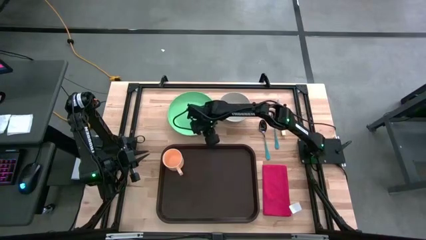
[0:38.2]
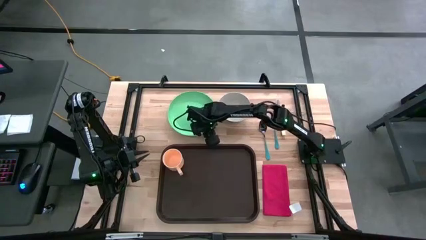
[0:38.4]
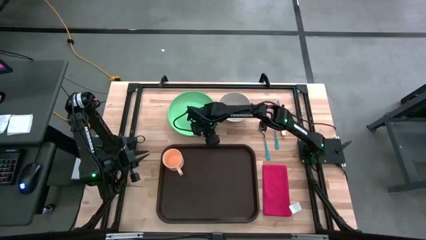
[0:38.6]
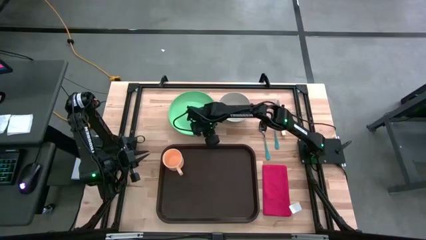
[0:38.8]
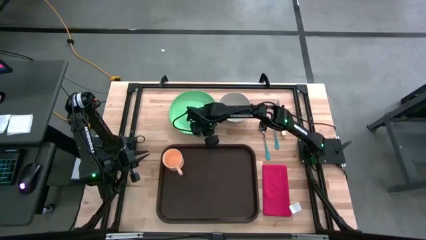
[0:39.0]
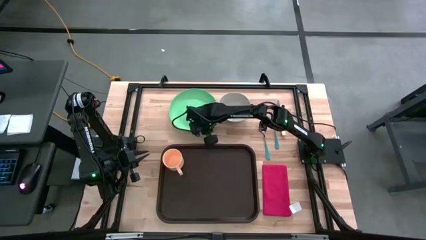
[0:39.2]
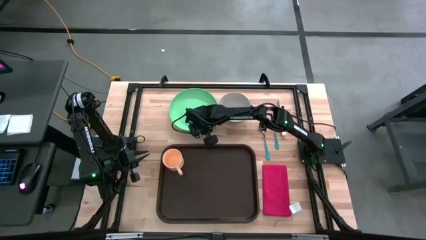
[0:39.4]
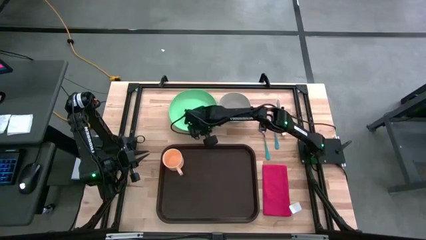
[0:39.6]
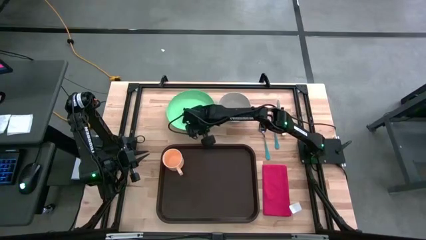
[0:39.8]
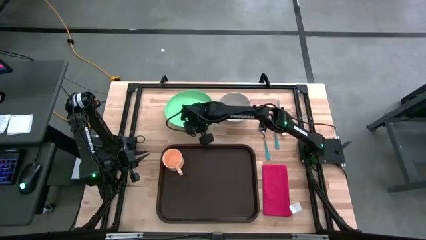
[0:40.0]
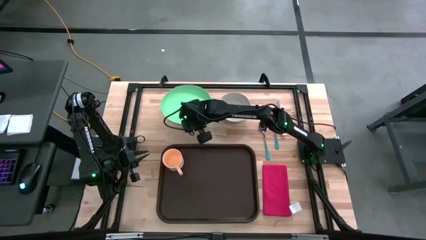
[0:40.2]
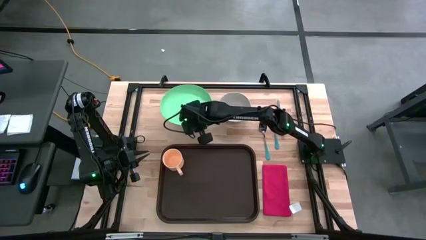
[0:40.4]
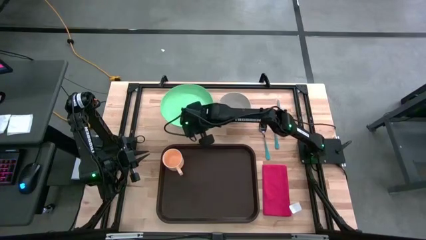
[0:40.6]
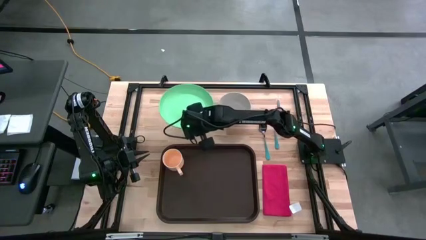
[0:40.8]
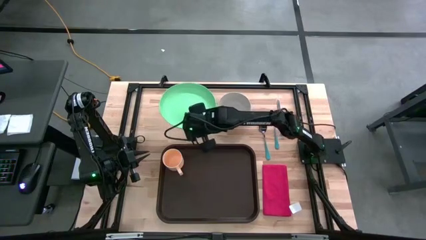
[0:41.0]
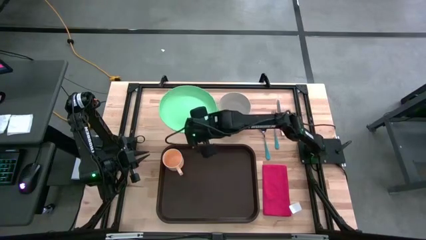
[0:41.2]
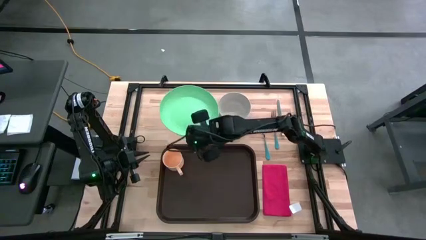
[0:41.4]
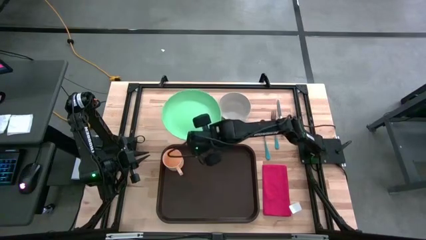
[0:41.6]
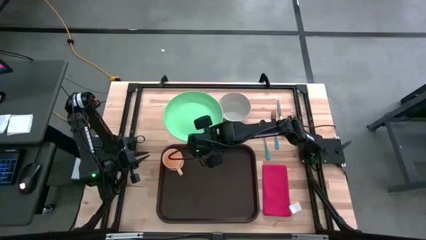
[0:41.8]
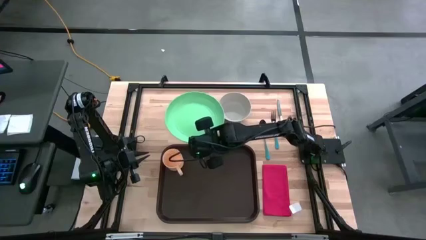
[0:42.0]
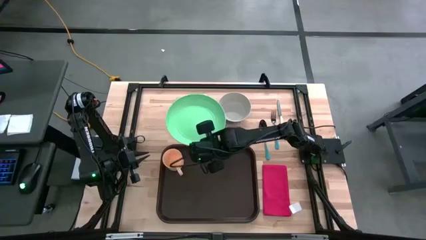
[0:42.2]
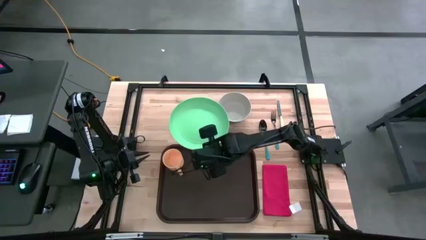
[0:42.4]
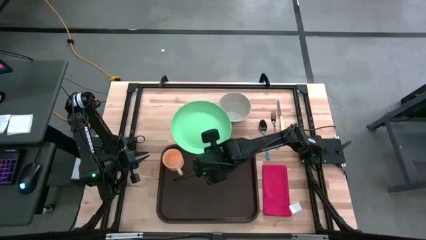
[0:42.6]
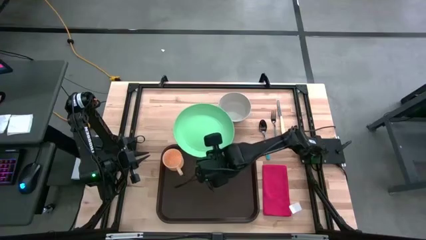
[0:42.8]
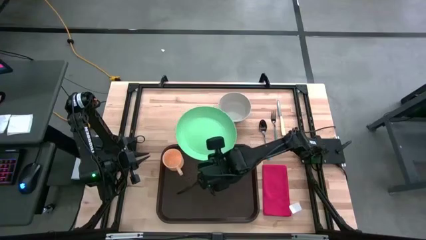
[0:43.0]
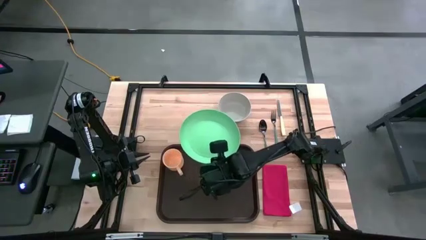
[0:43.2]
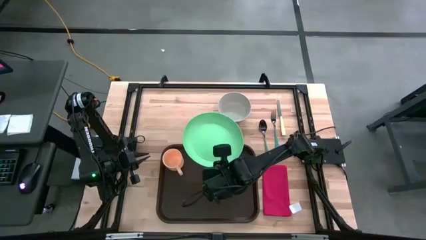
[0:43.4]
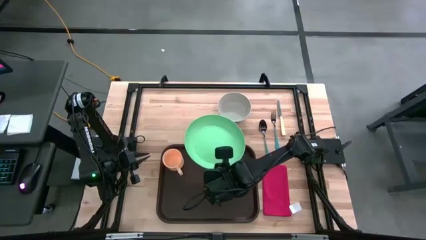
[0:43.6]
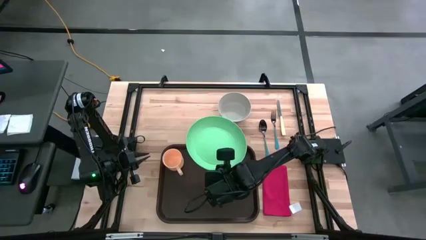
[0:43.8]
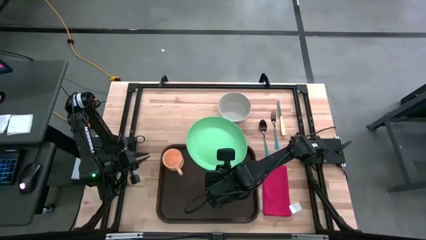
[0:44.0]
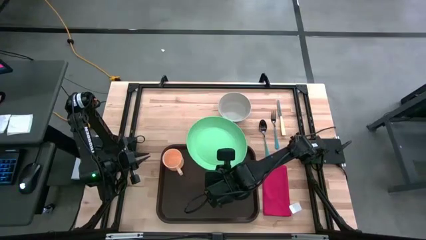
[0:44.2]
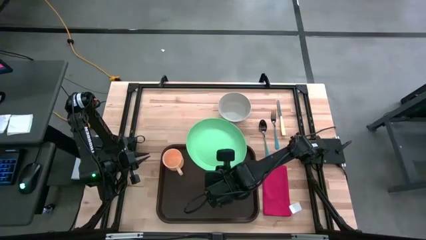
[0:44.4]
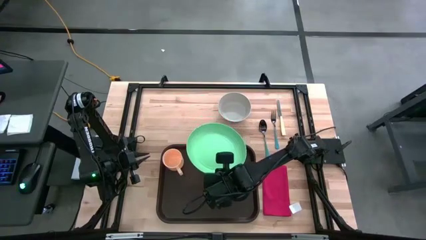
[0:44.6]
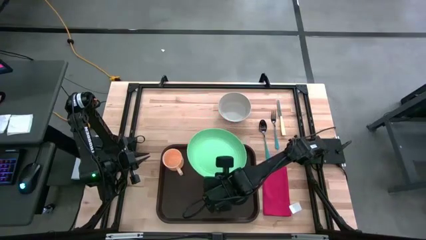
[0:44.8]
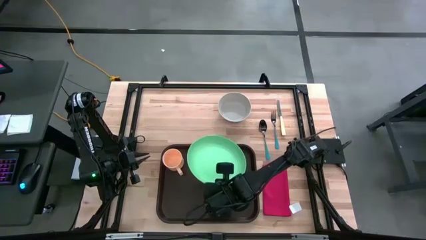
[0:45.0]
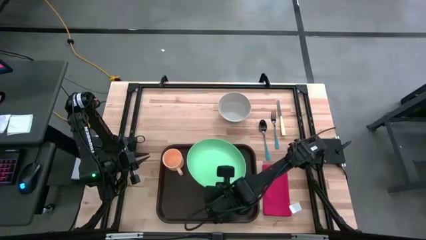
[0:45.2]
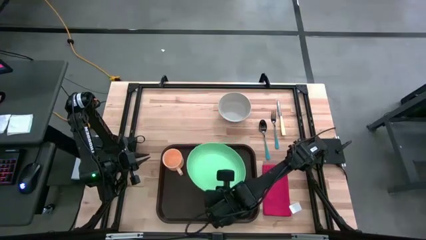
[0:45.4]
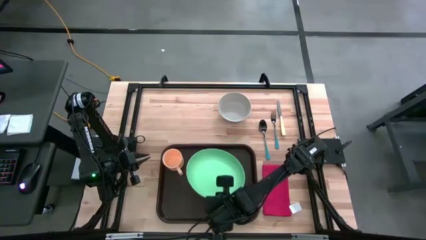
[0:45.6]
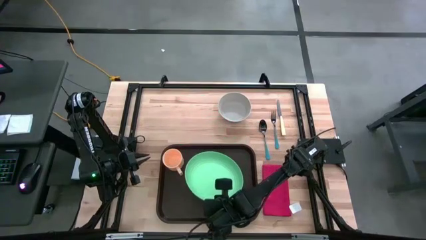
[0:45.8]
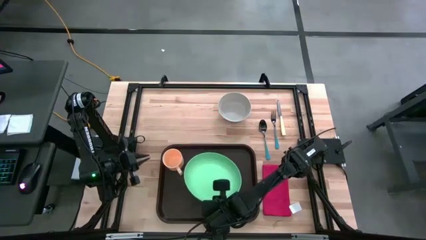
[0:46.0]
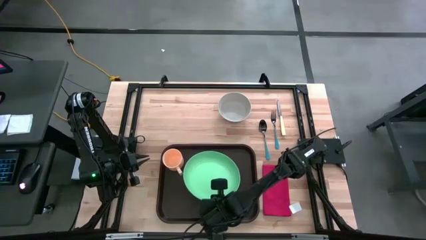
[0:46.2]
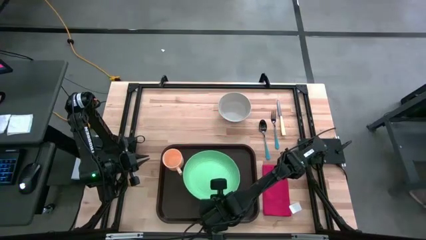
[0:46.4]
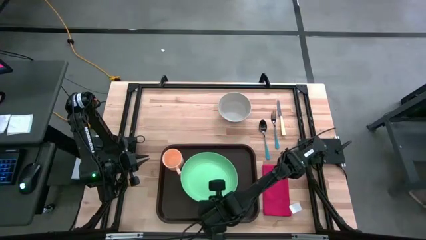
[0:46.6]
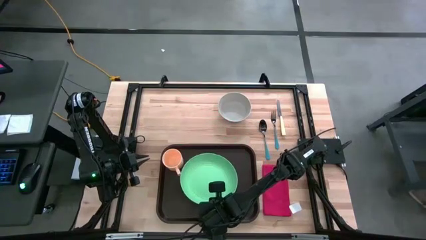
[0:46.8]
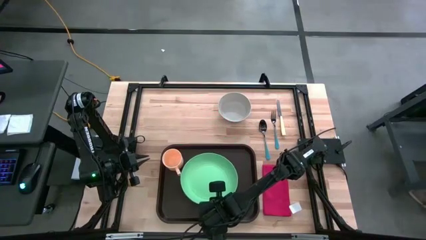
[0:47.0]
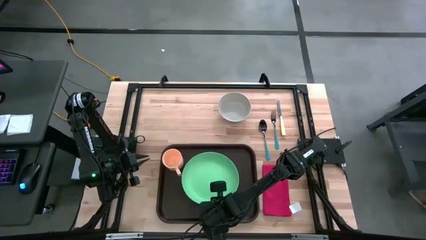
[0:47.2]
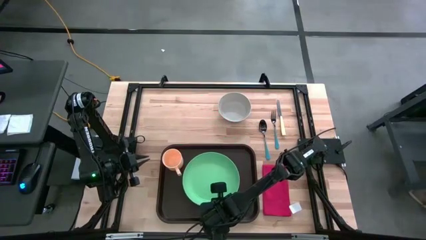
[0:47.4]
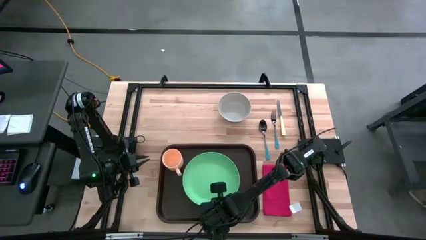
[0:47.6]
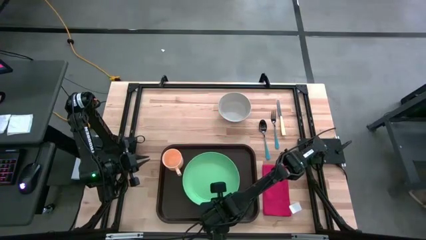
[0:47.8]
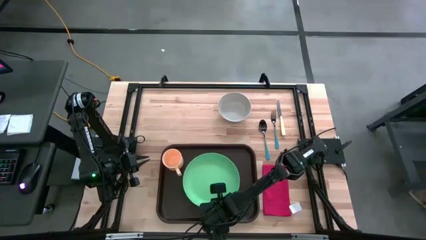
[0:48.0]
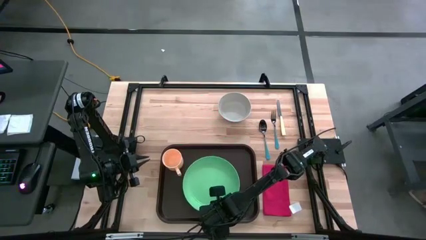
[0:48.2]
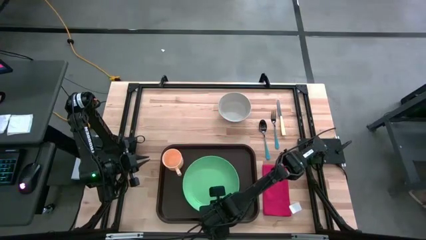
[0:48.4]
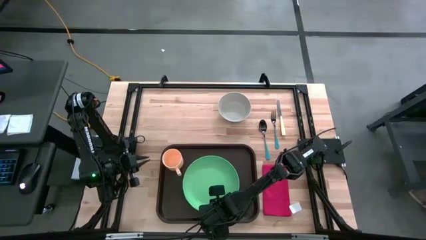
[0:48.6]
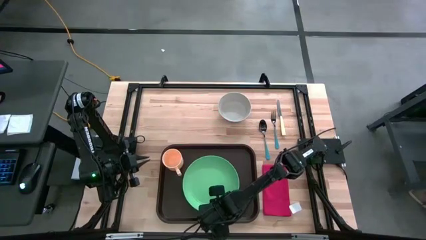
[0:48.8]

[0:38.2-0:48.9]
Task: Set up tray
Put the green plate on the black serving tray to the bottom right of the orange mug

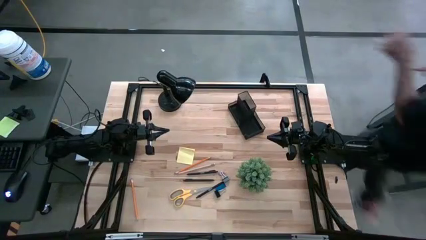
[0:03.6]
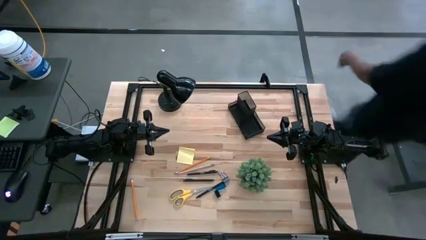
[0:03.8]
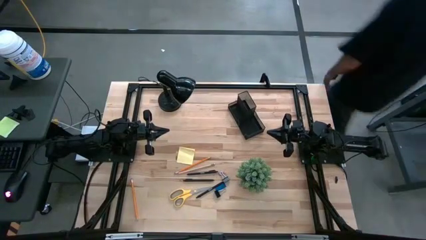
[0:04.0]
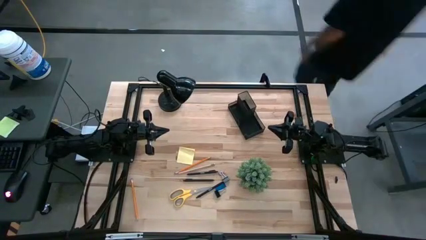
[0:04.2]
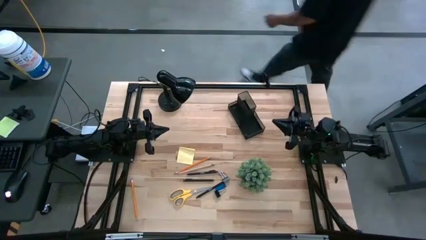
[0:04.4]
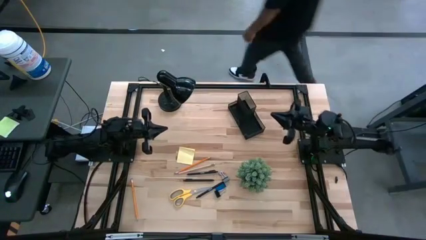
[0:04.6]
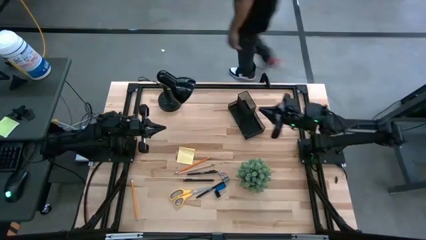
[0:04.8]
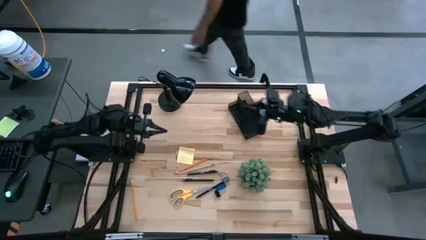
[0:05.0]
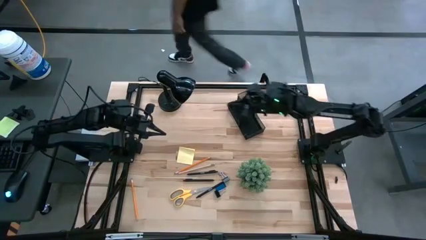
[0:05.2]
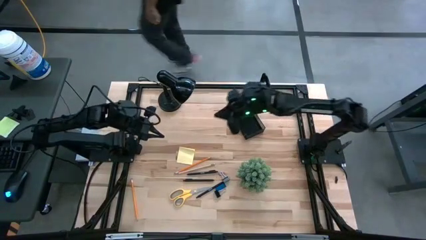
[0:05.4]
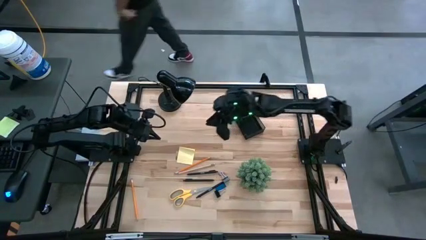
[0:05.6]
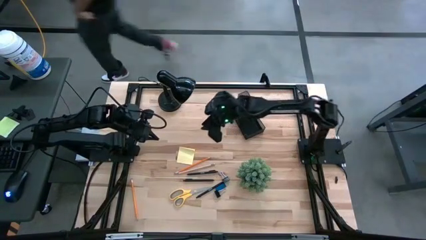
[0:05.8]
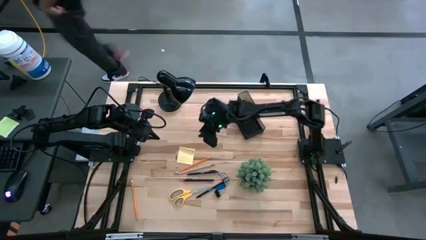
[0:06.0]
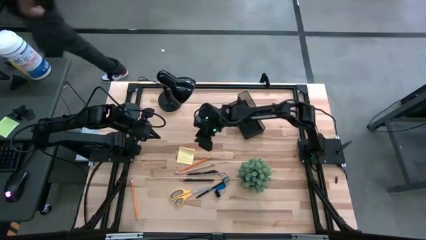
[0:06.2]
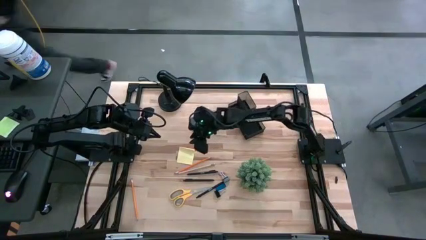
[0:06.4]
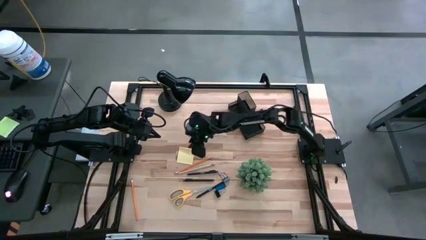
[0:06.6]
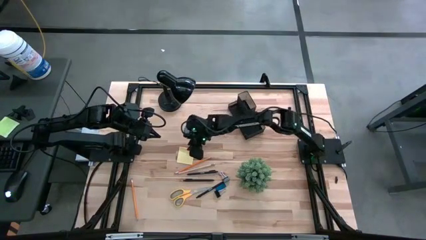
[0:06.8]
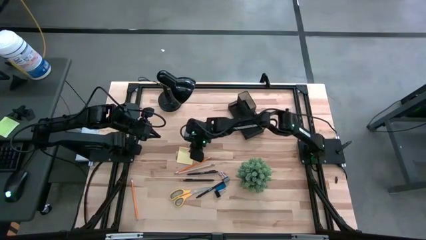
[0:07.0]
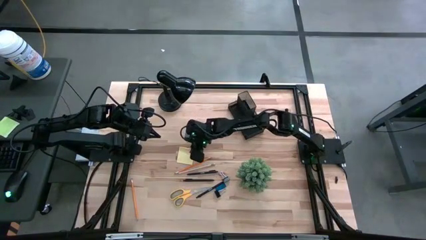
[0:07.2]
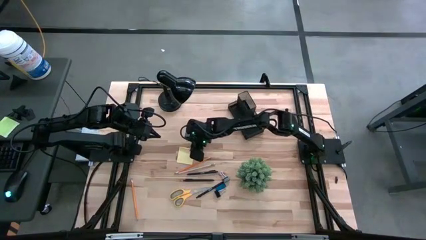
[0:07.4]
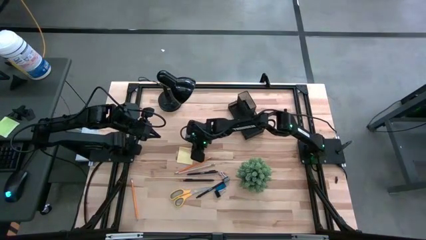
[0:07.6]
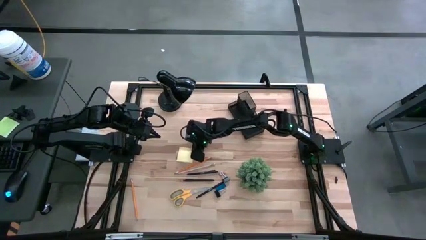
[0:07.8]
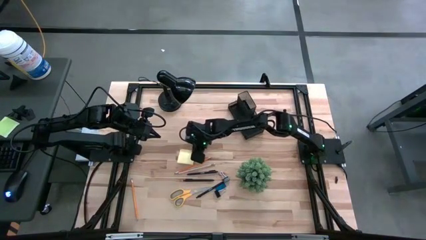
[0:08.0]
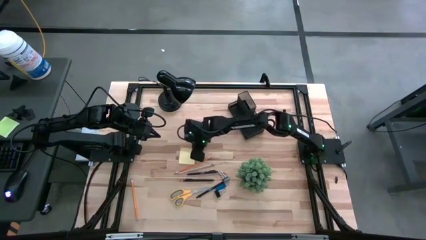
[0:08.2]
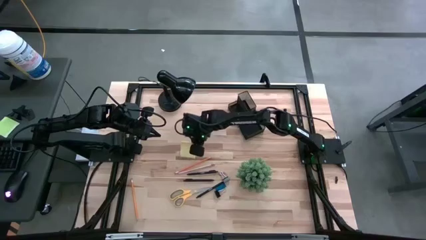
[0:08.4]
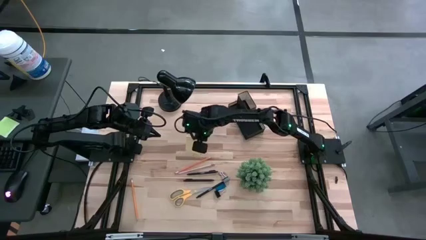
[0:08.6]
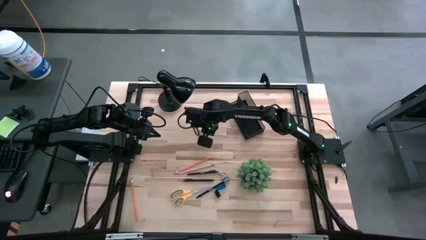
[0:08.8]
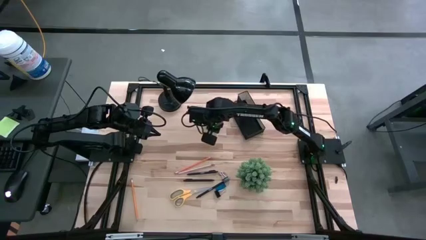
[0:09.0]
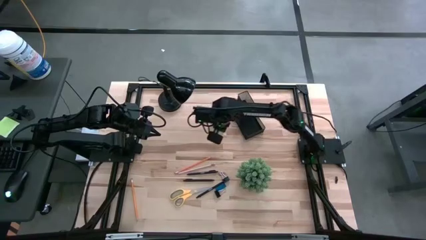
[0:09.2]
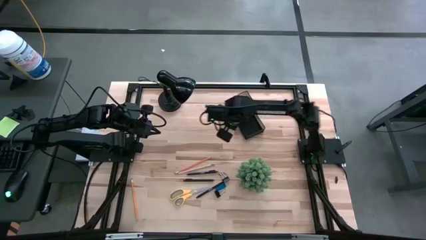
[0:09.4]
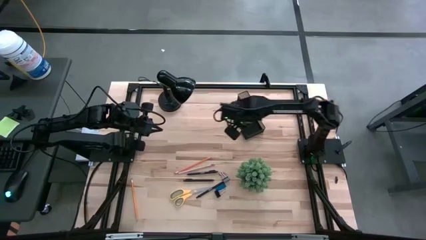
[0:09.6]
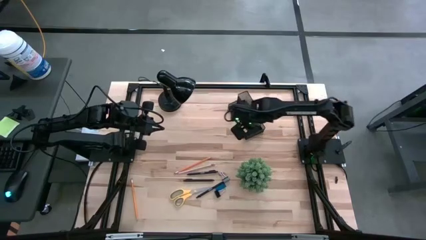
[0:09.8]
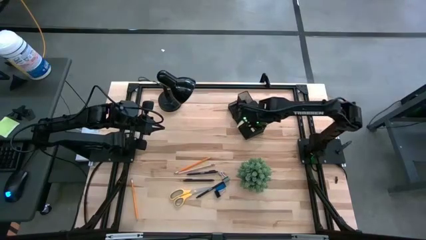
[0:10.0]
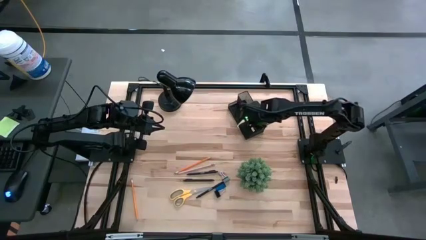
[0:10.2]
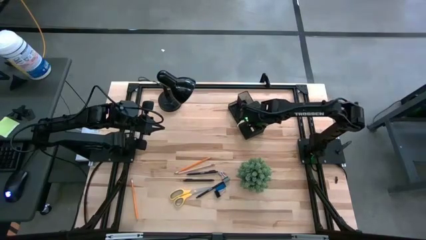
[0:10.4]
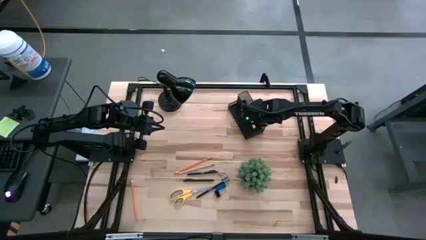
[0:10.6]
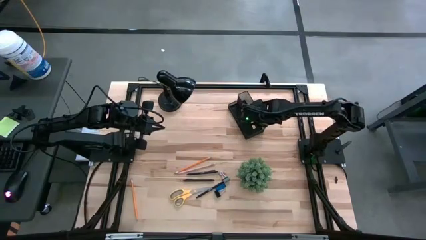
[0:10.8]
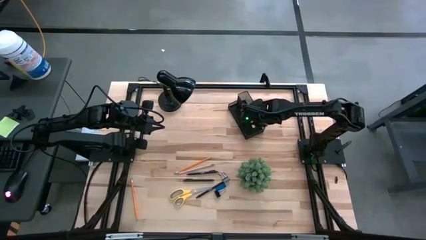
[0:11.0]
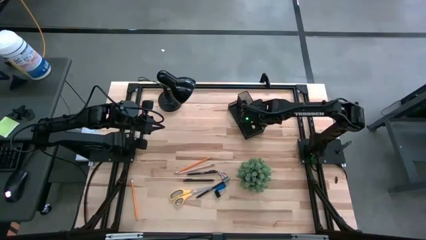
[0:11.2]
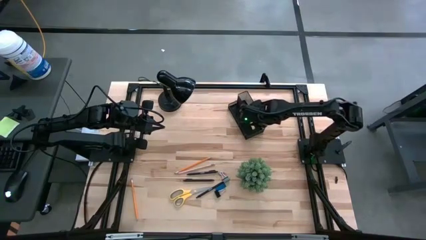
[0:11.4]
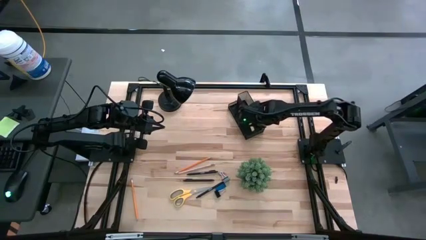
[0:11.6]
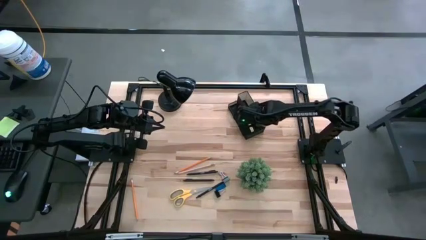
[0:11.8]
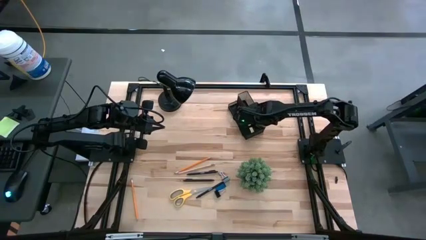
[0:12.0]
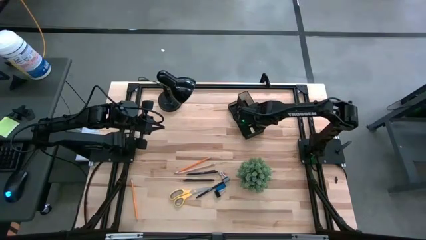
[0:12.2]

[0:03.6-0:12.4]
Task: Pick and place office supplies into organizer
Put the yellow sticky notes into the desk organizer
